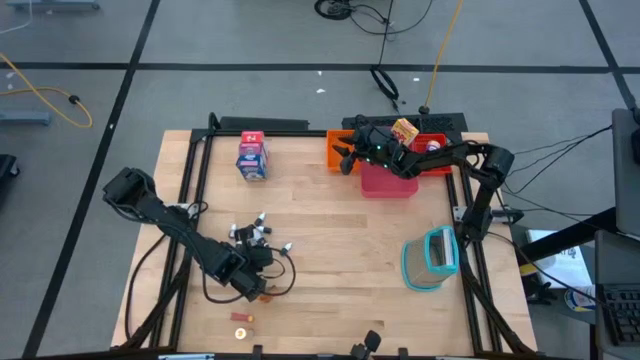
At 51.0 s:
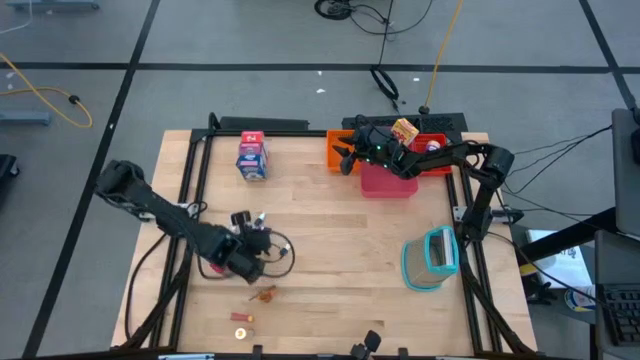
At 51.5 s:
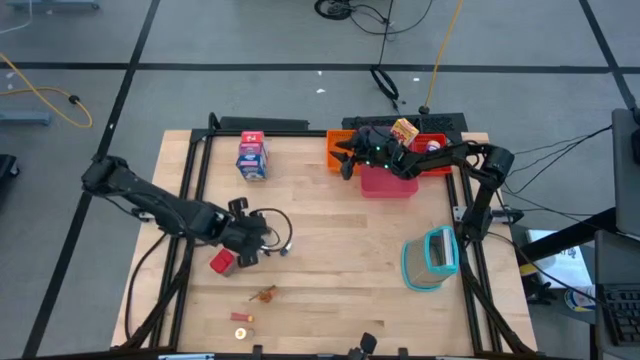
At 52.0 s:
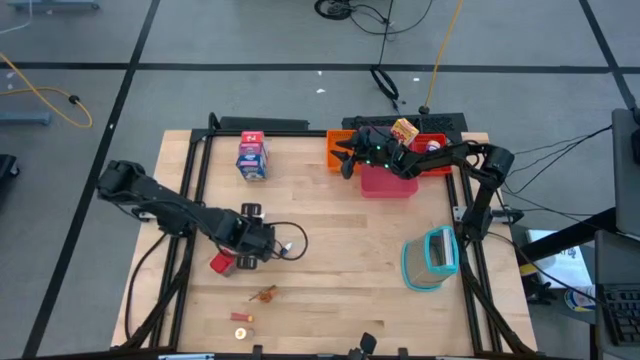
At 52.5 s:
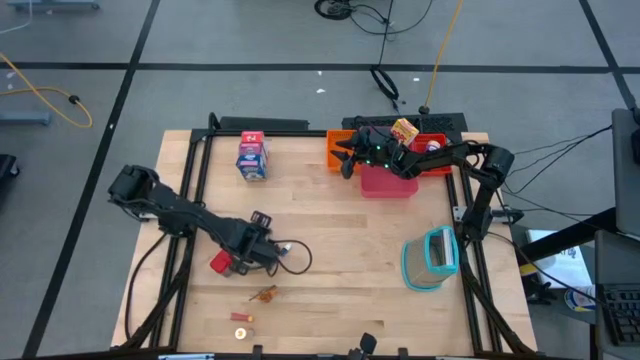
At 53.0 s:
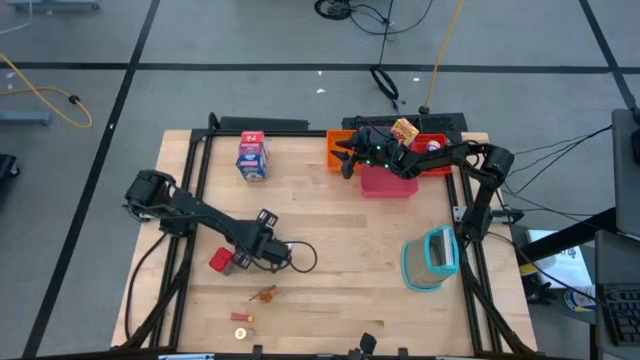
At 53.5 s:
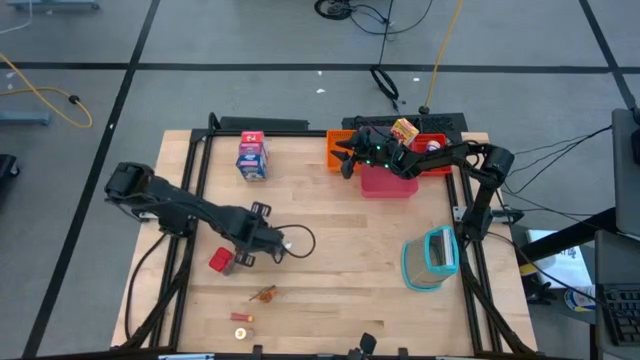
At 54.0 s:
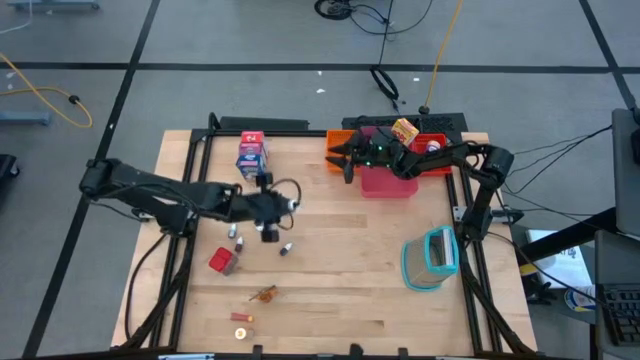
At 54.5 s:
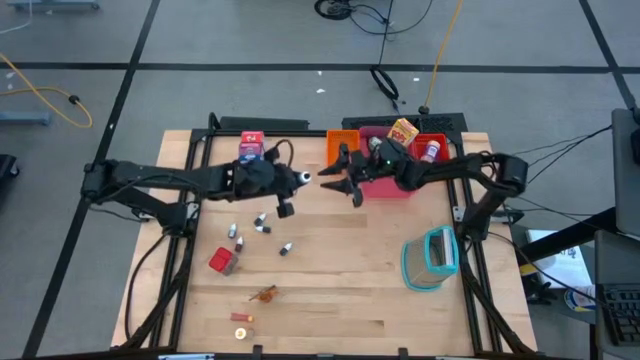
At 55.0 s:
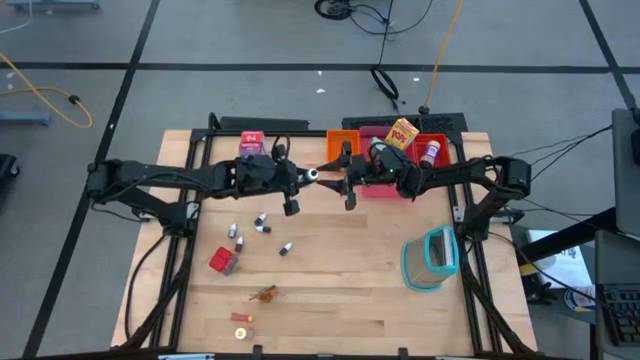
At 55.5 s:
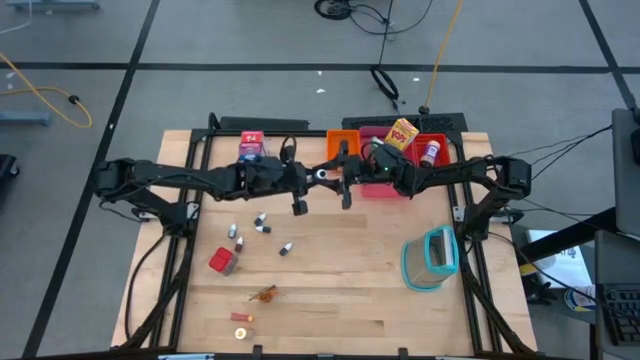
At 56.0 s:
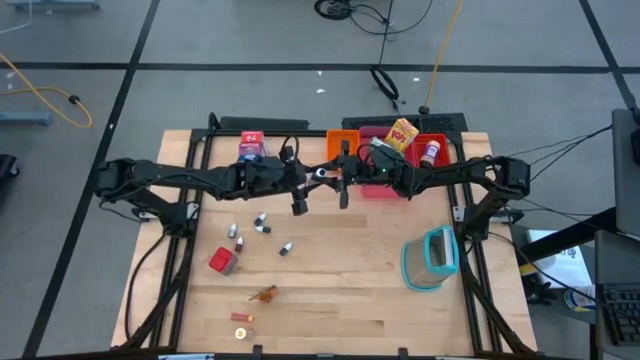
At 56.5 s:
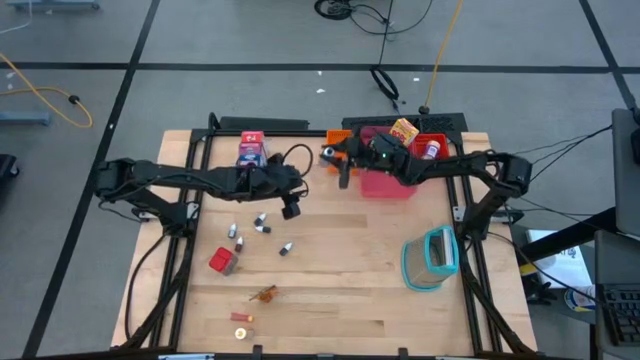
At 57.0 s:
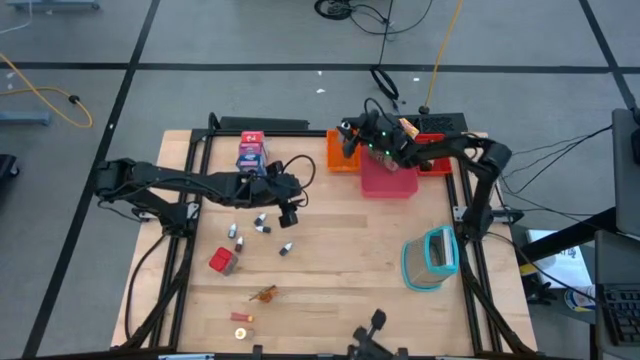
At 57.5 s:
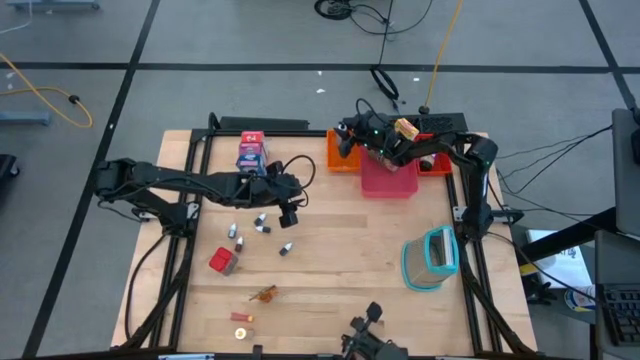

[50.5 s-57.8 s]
Task: Pick & Place Kitchen Items
Put the large black food coloring bottle into the orange bin

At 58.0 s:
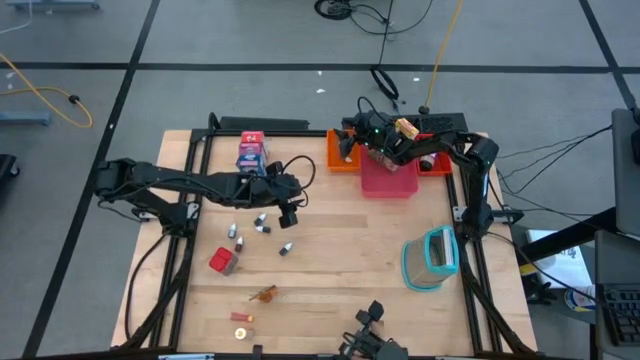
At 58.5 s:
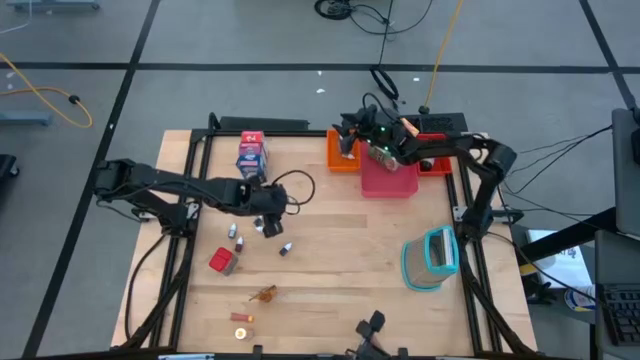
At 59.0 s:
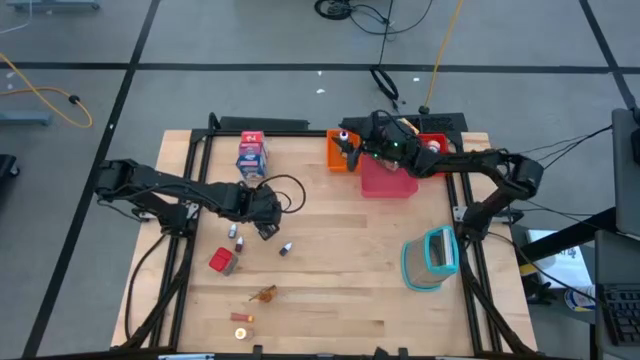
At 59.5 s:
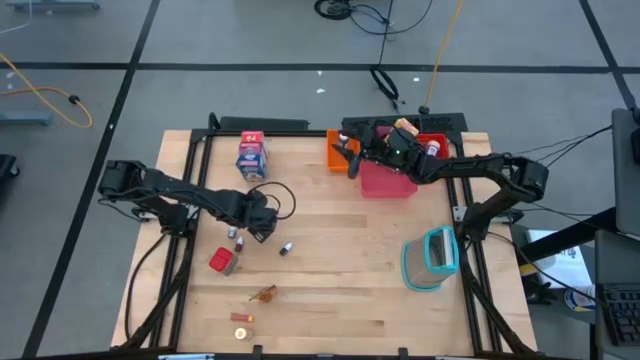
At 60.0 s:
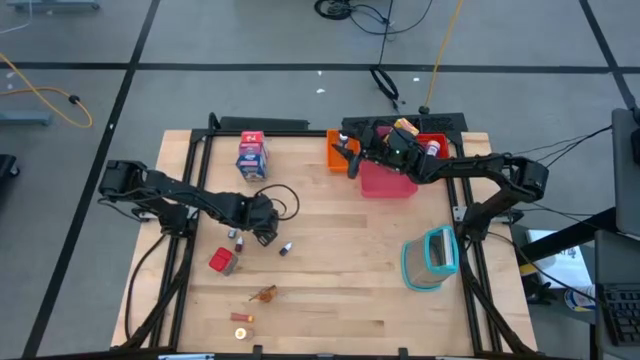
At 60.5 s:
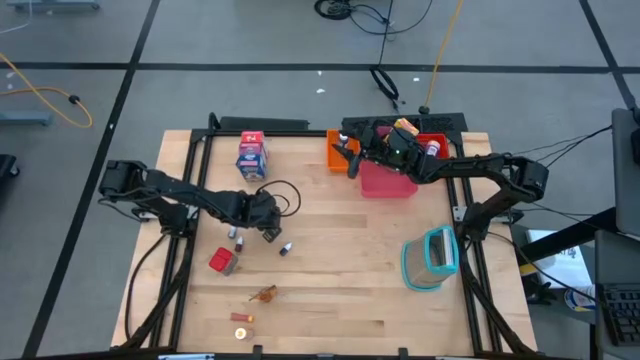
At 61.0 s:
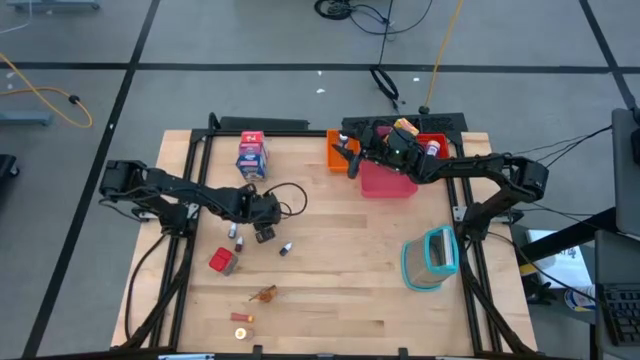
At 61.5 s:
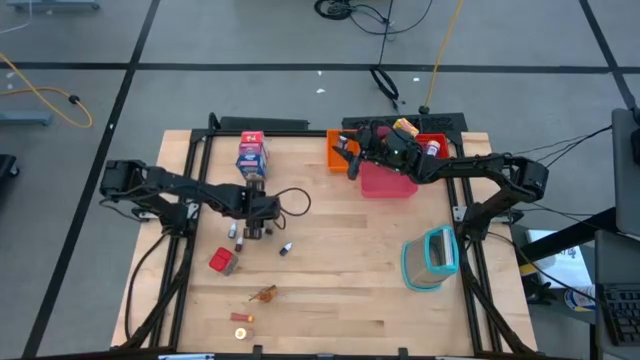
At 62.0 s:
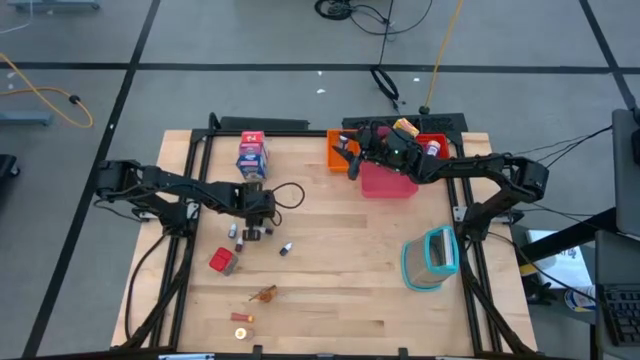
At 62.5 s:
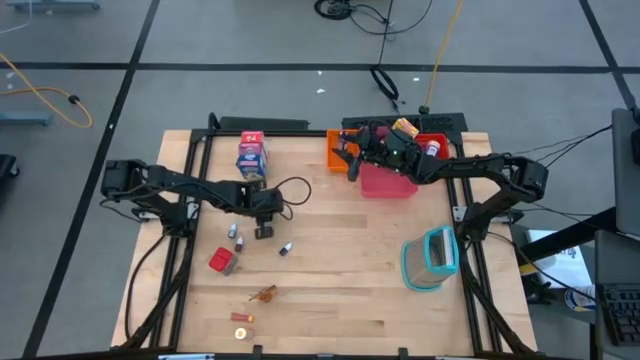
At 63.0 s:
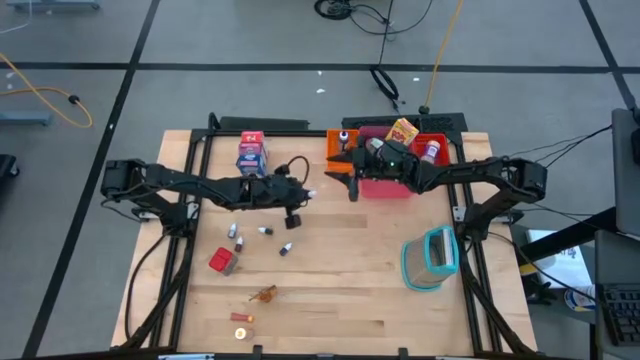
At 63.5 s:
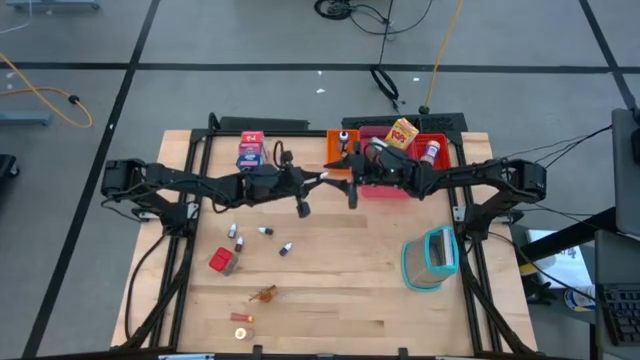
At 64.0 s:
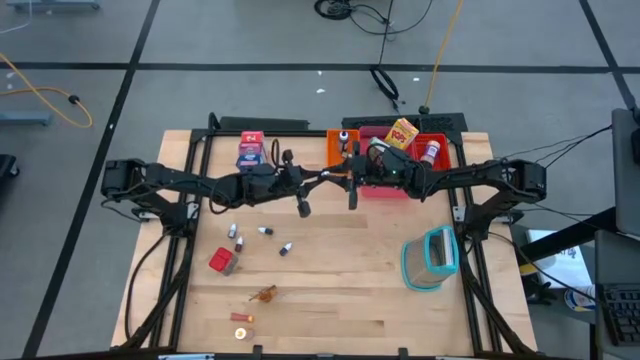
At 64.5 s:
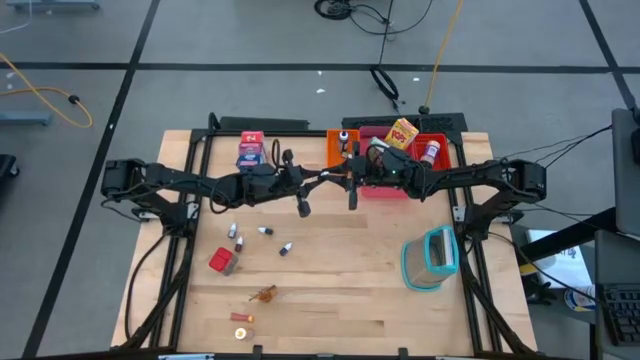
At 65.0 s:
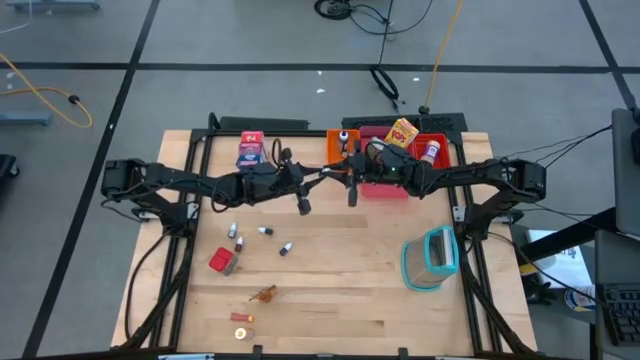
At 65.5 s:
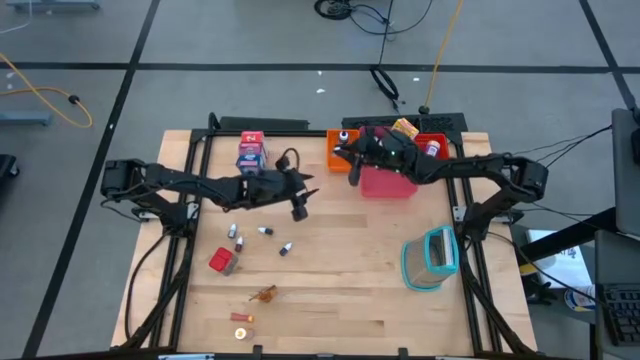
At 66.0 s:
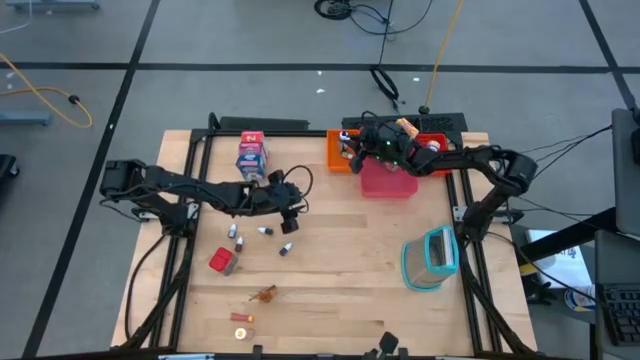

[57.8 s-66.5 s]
Put the small brown food coloring bottle into the orange bin

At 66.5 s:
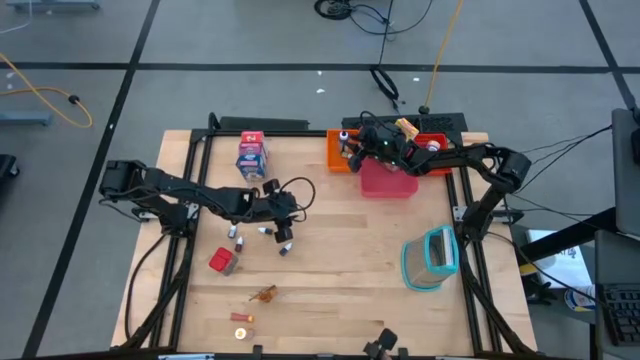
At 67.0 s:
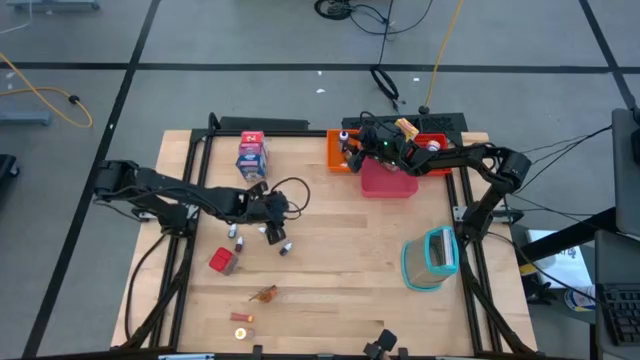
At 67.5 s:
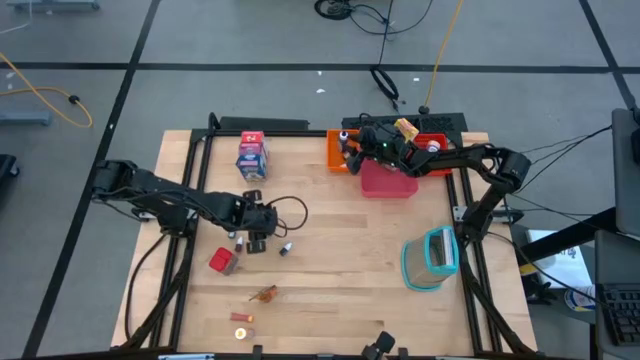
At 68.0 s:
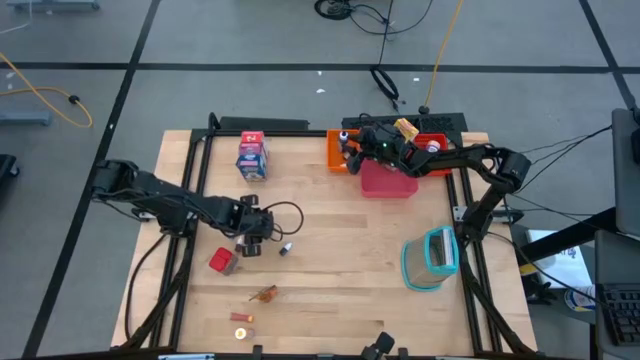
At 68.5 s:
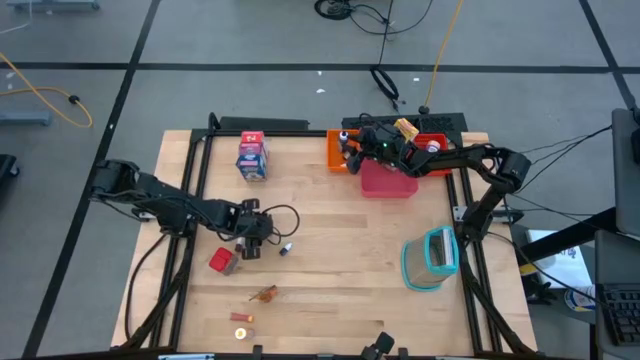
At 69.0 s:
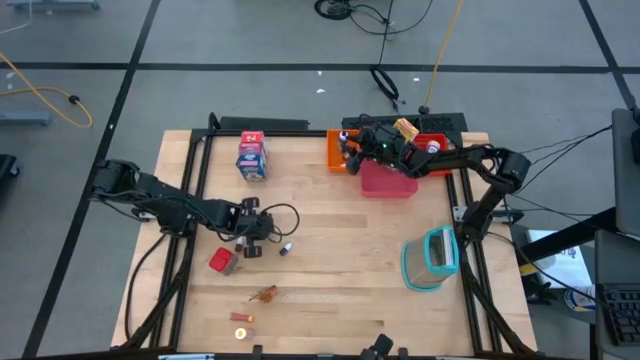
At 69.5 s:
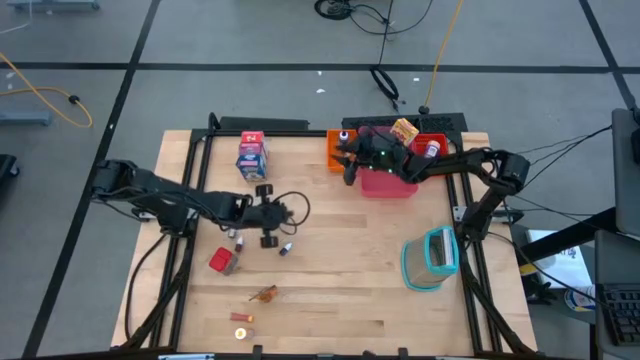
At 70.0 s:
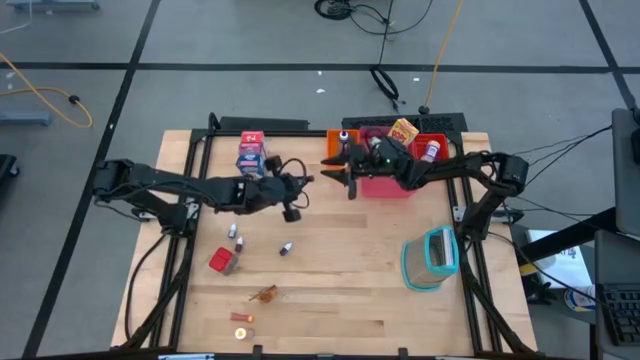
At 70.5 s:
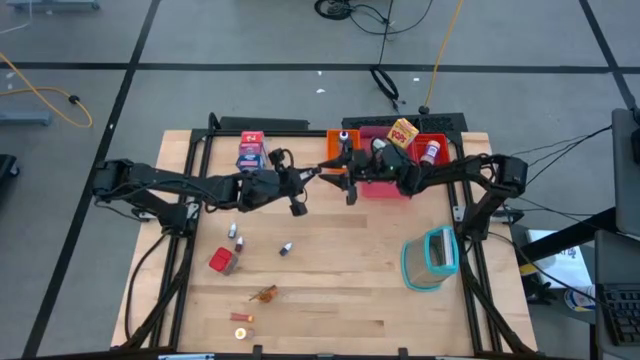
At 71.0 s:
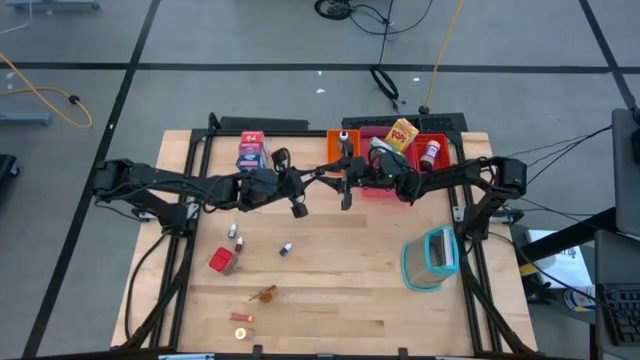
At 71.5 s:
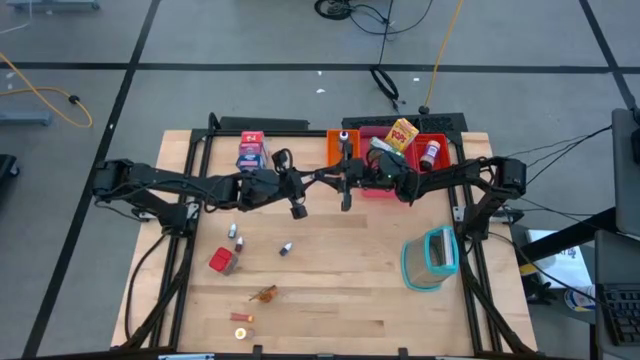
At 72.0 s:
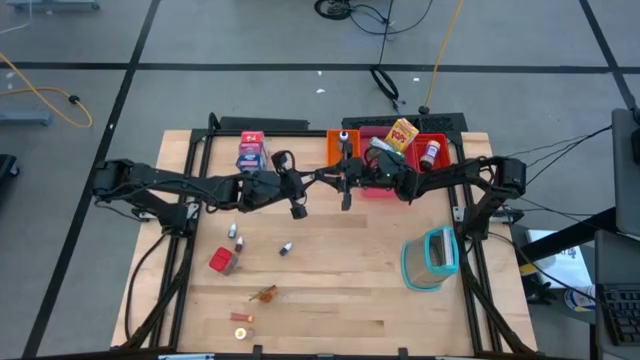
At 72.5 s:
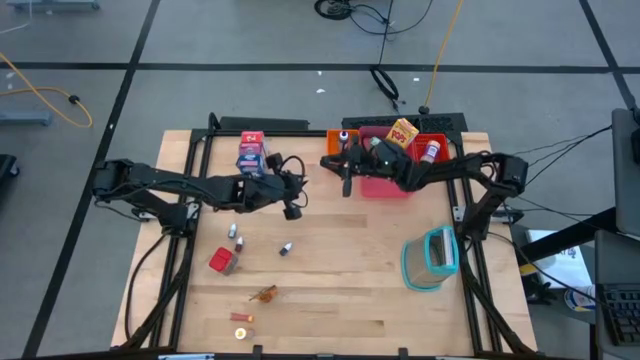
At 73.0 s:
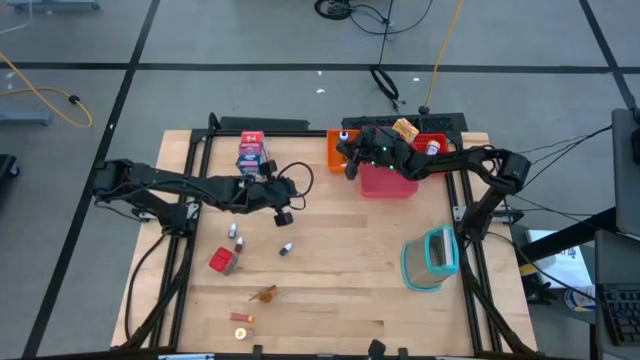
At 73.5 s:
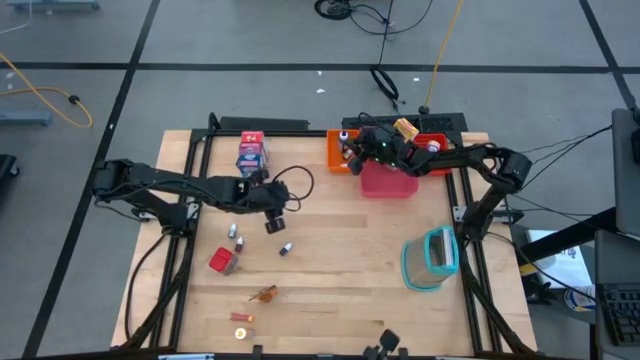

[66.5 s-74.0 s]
Put the small brown food coloring bottle into the orange bin
